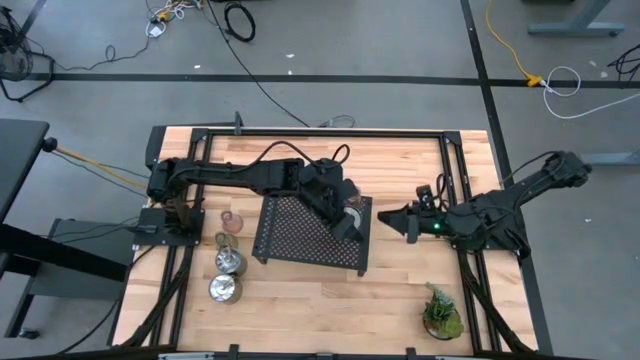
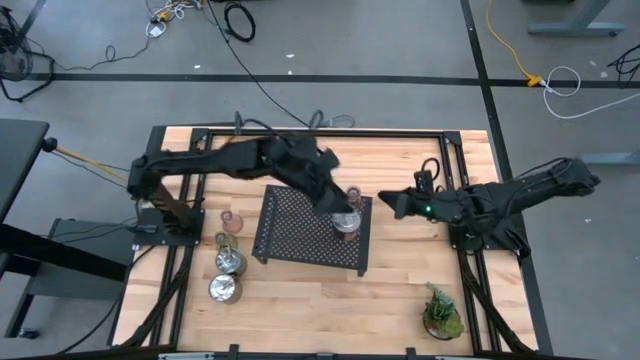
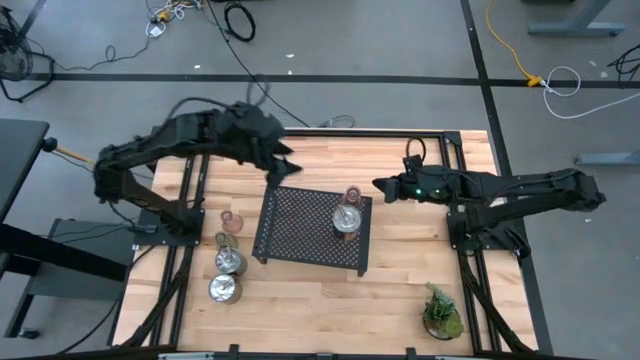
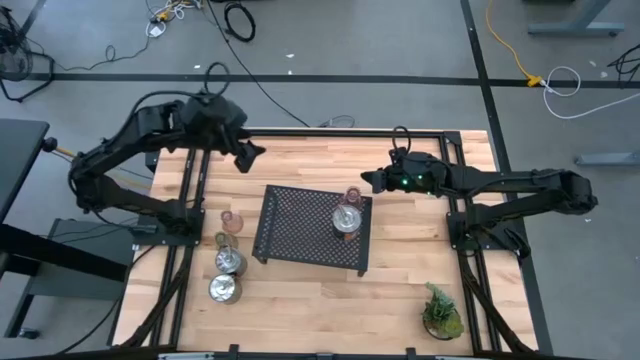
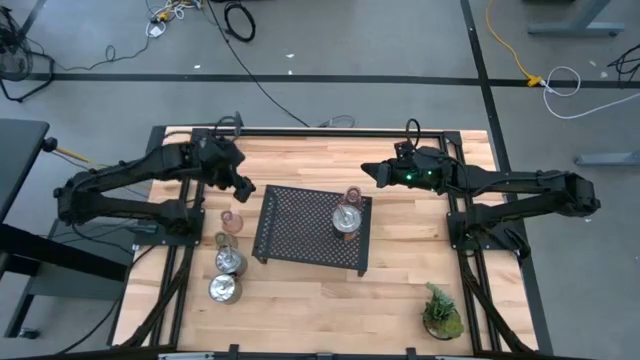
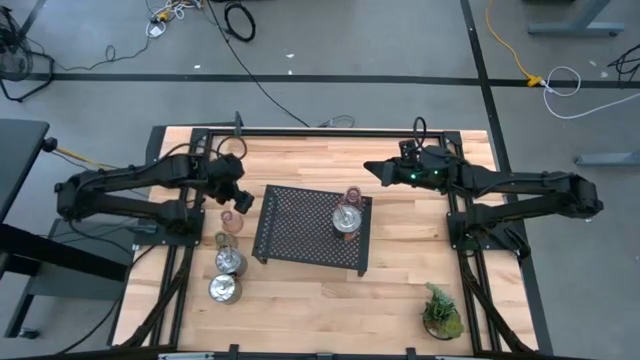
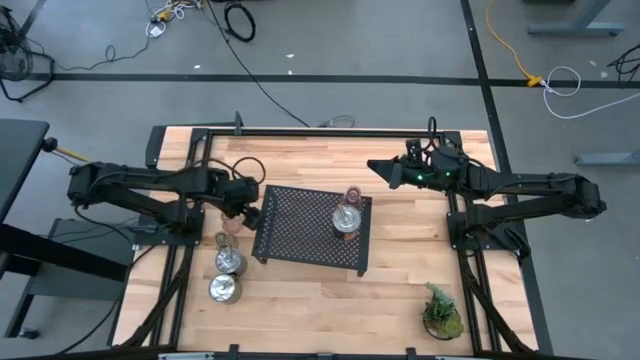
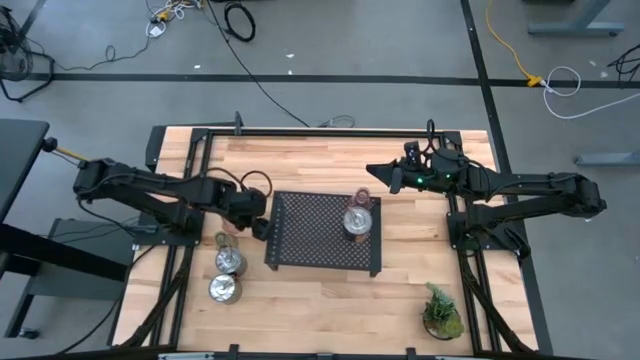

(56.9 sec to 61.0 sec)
Task: Pick & Place candle stick holders
Adjust the shelf

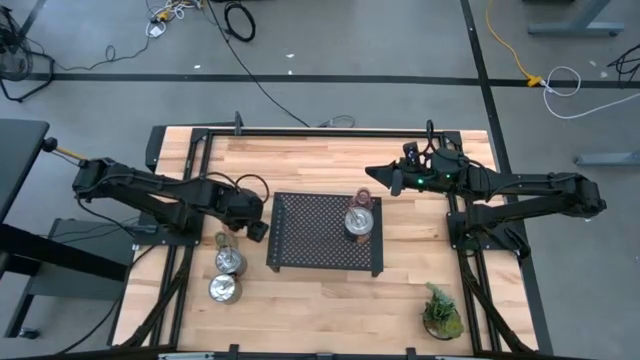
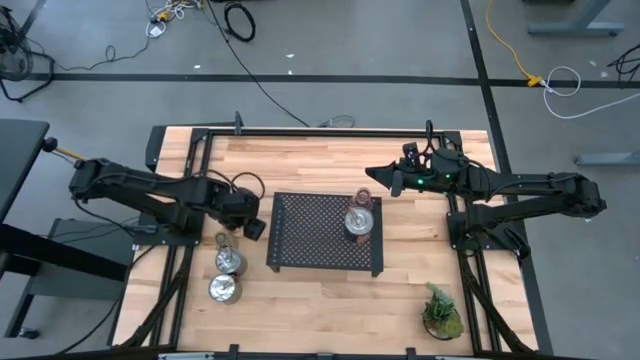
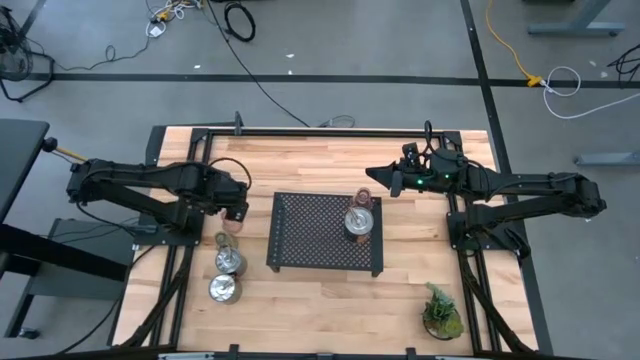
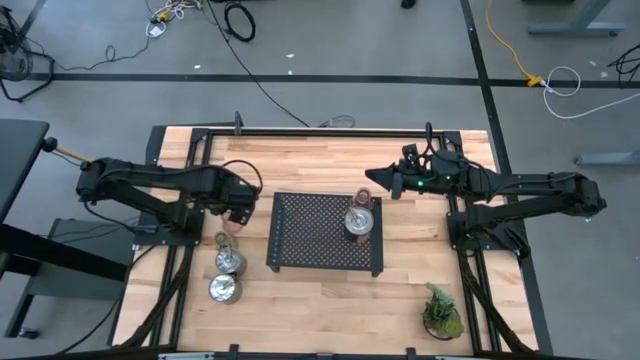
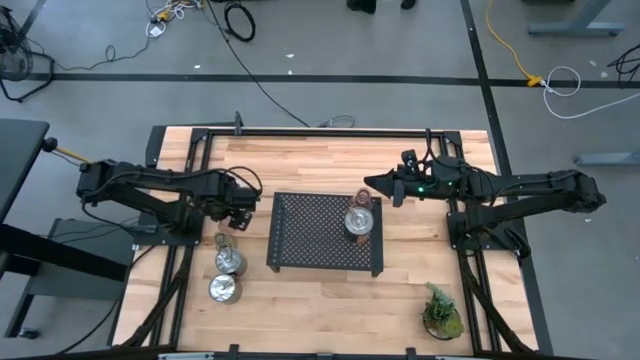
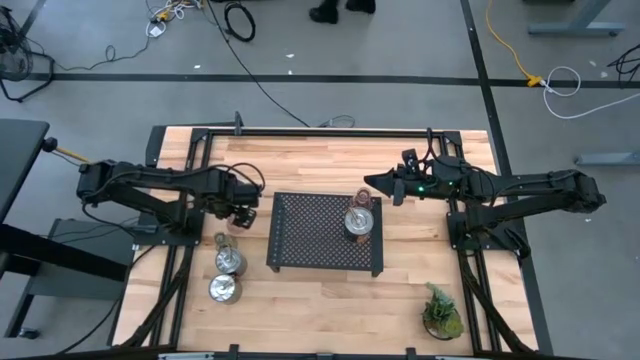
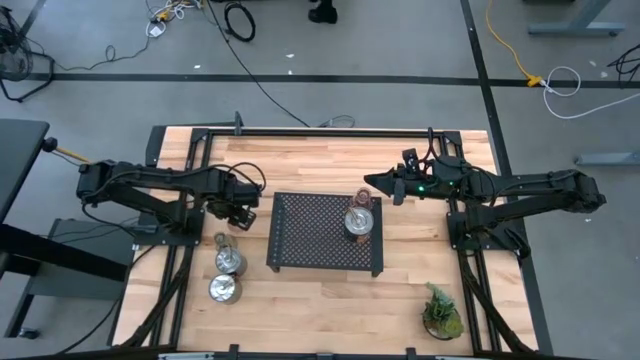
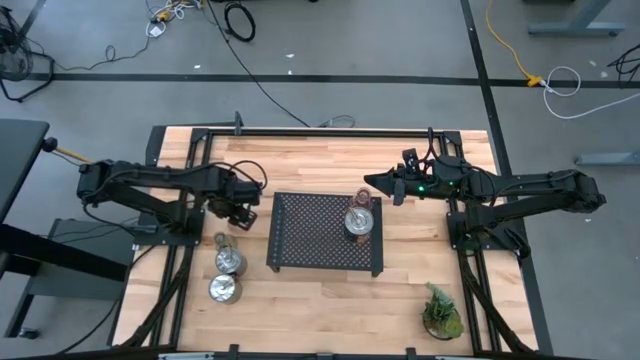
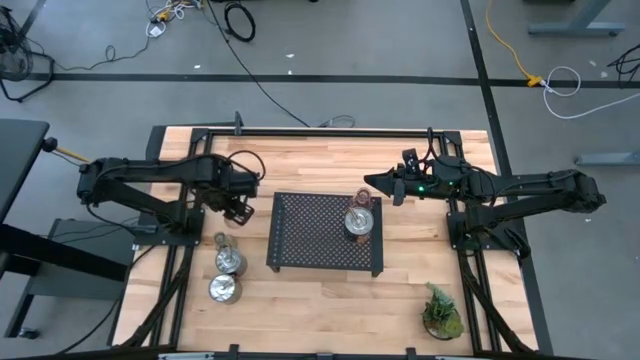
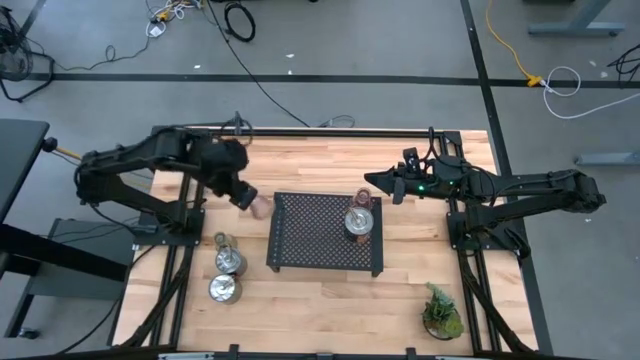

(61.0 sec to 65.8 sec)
Put the pink candle holder on the shelf

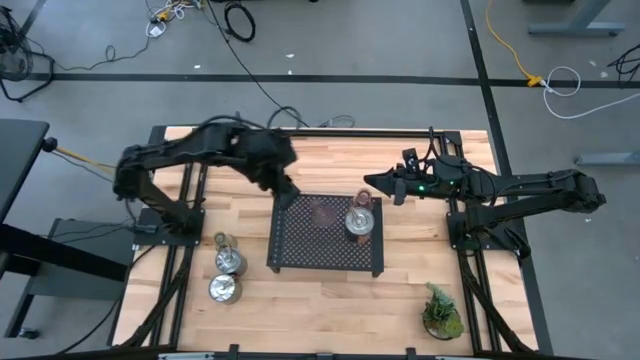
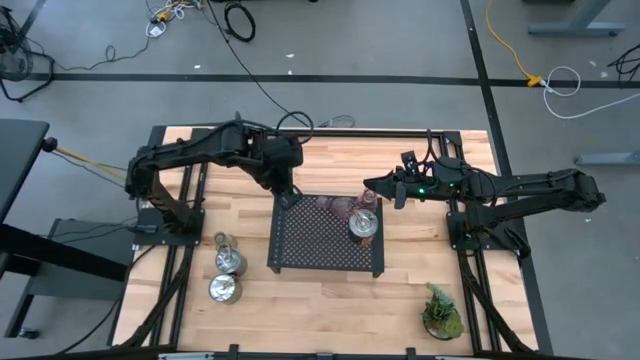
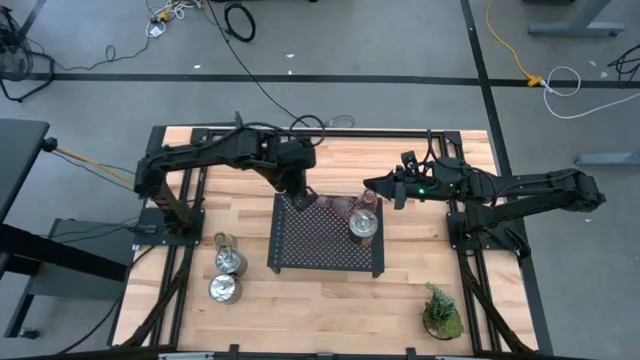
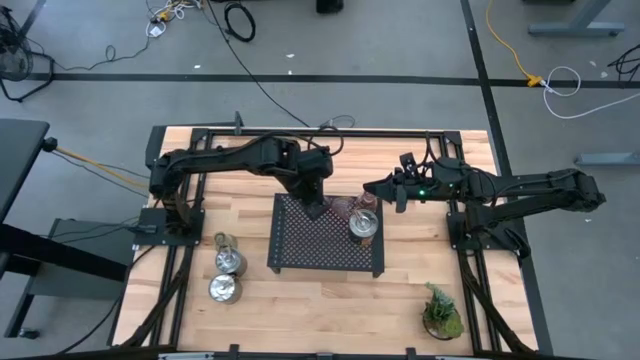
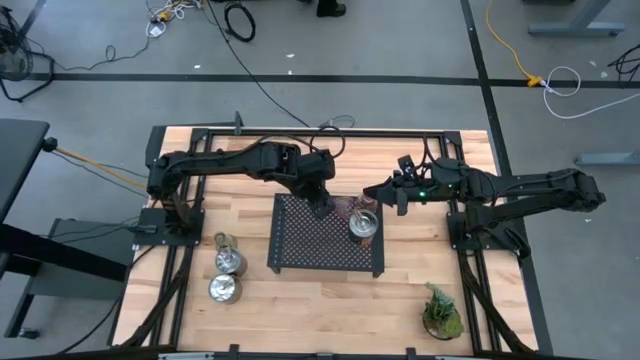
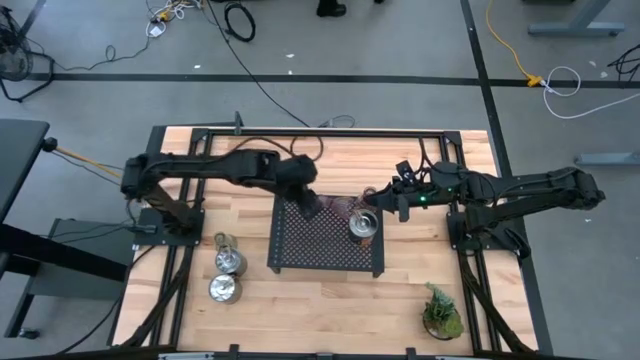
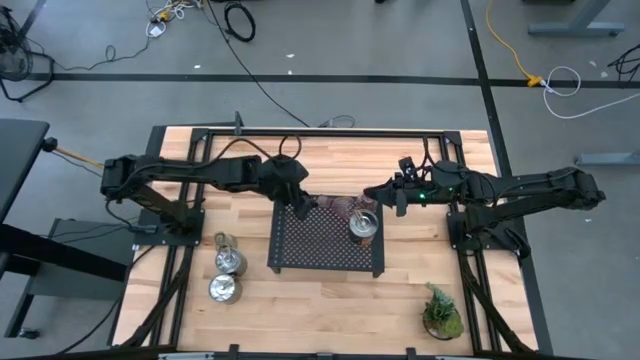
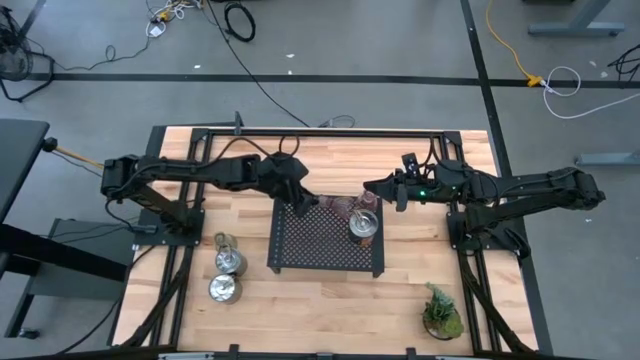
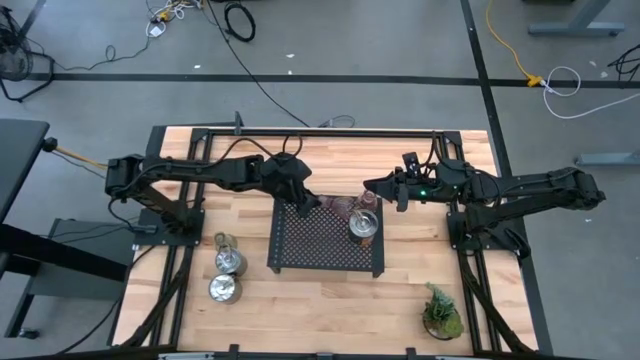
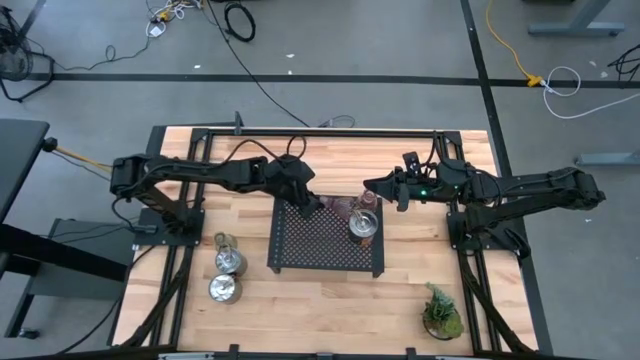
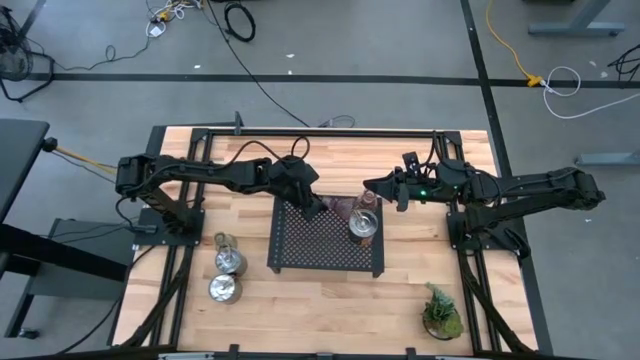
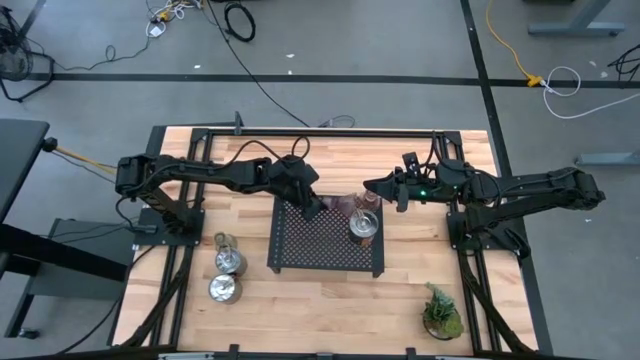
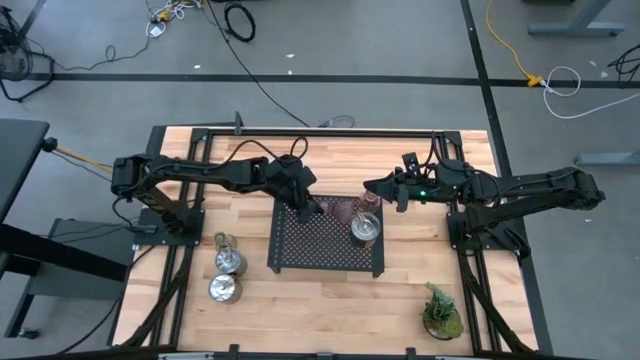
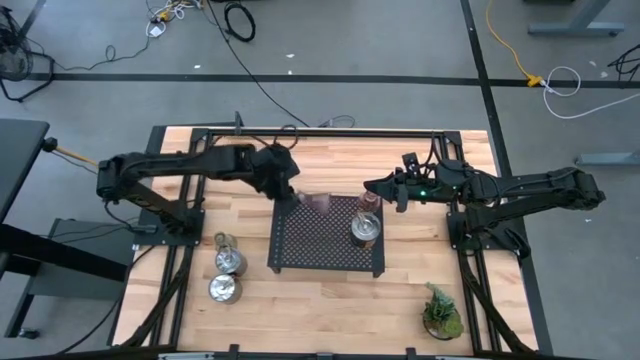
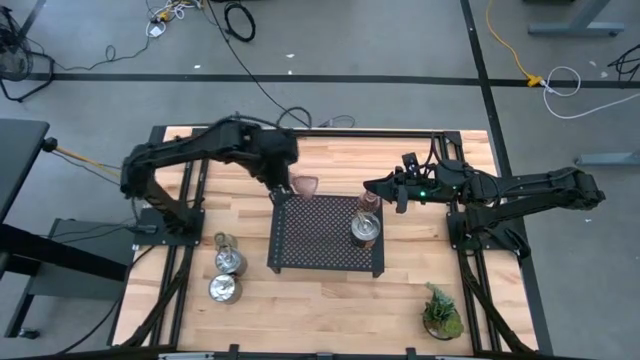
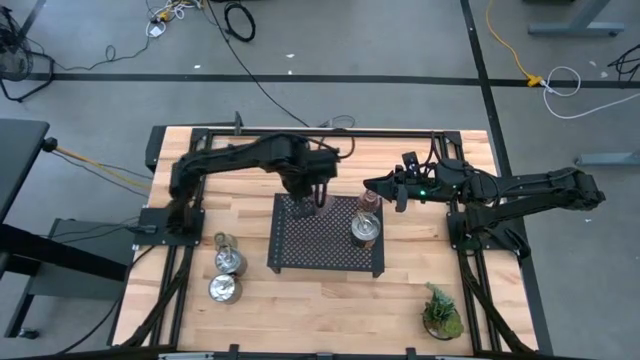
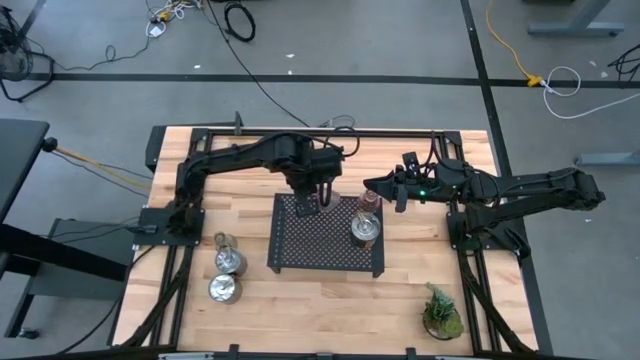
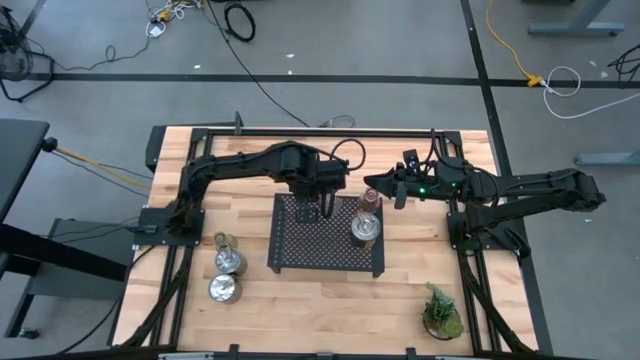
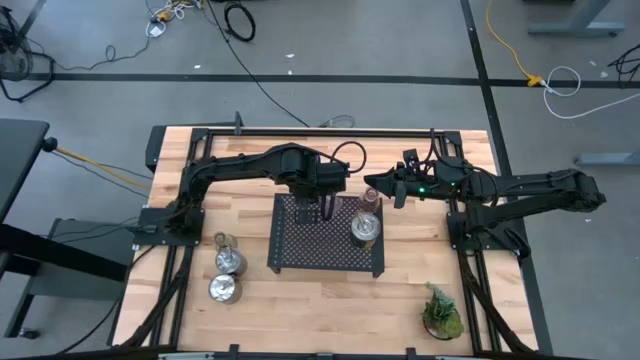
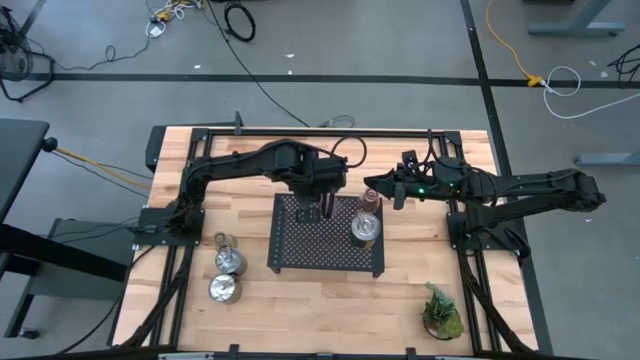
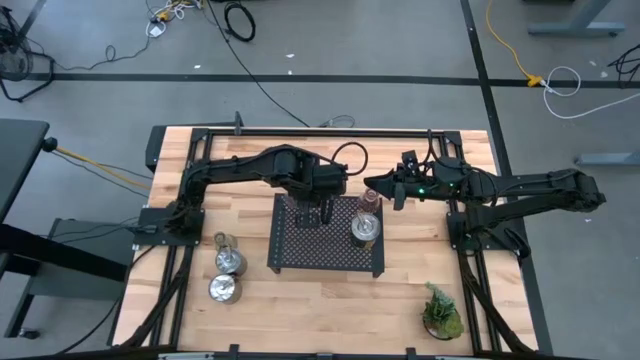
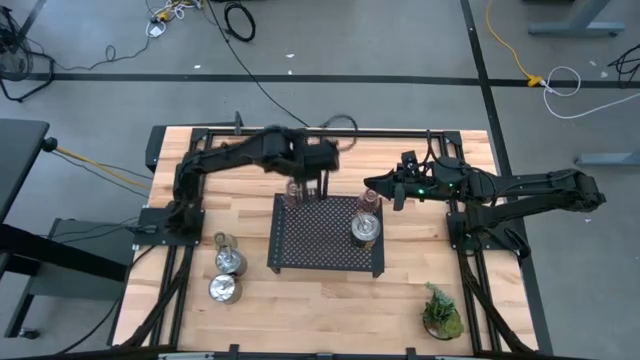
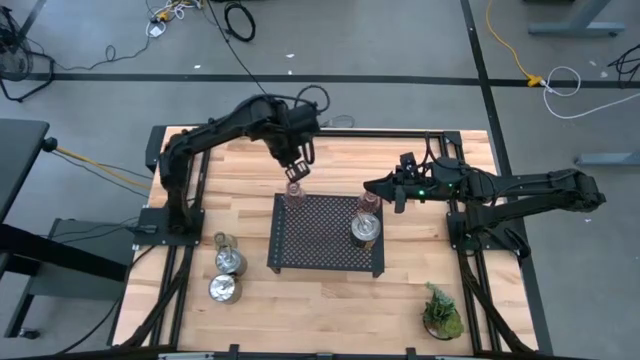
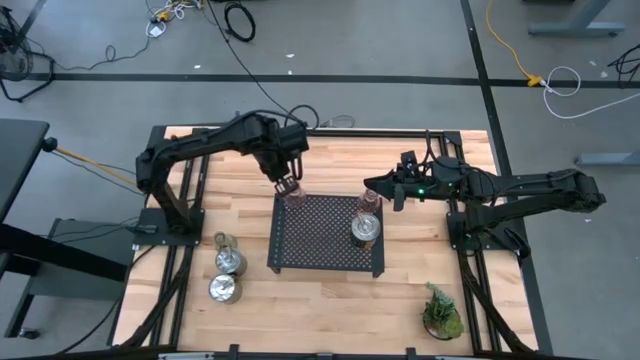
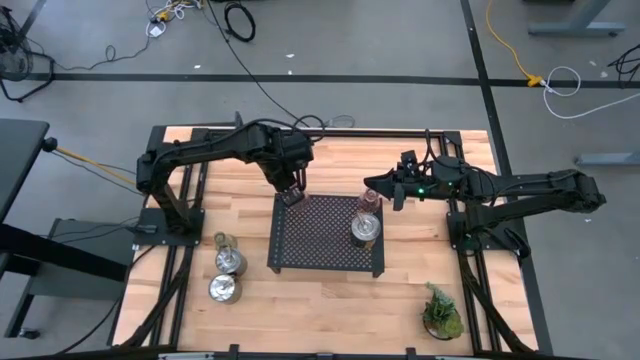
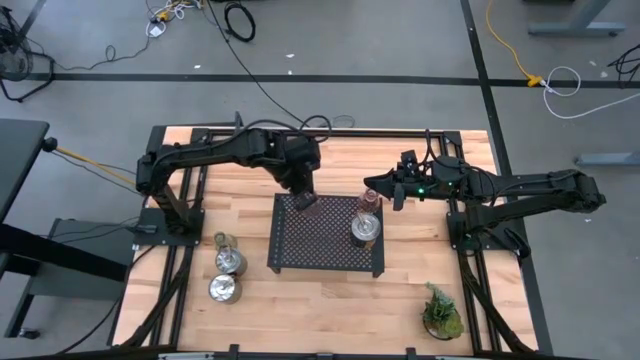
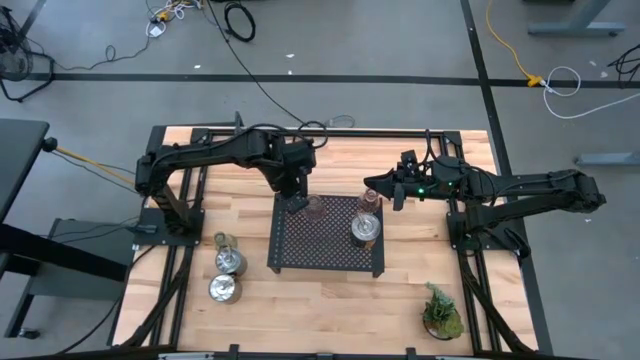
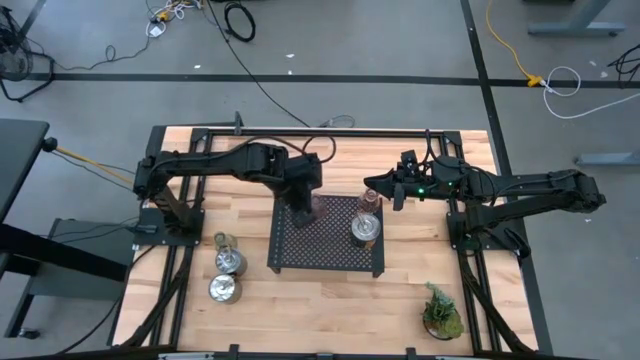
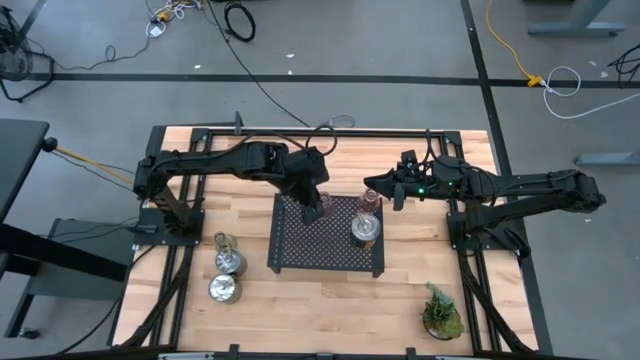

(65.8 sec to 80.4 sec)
Put the pink candle holder on the shelf
